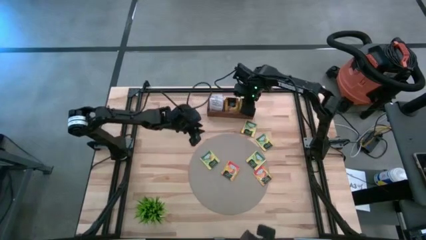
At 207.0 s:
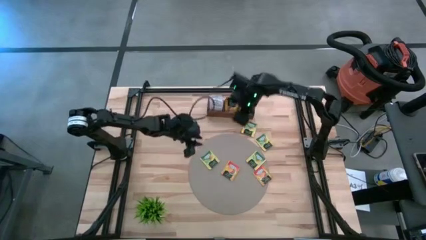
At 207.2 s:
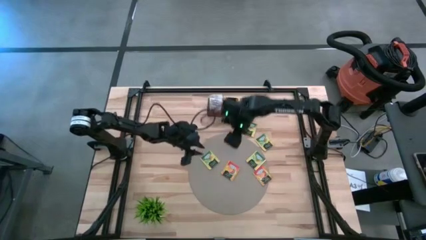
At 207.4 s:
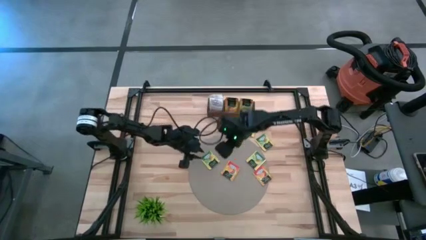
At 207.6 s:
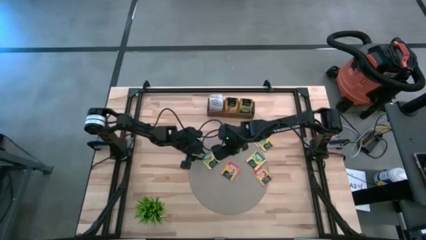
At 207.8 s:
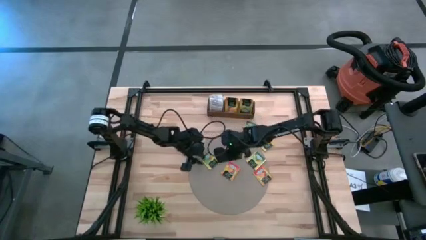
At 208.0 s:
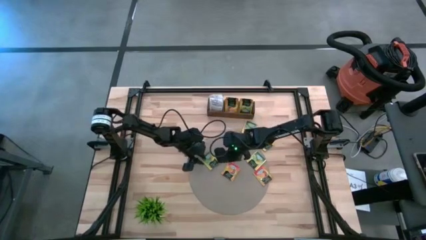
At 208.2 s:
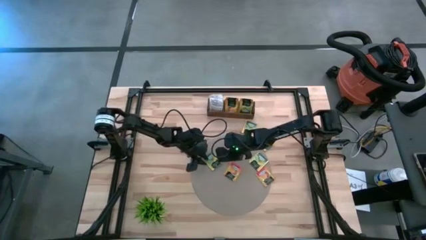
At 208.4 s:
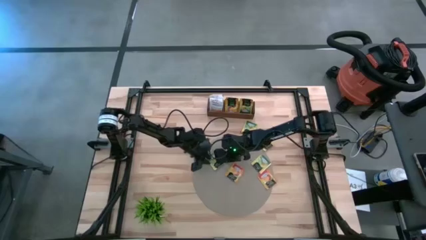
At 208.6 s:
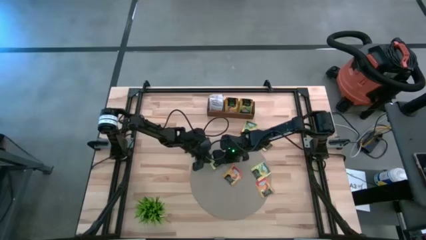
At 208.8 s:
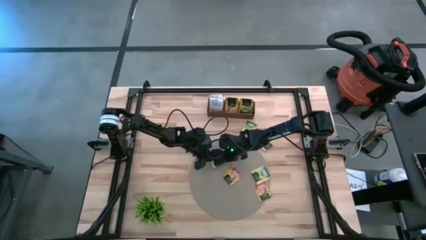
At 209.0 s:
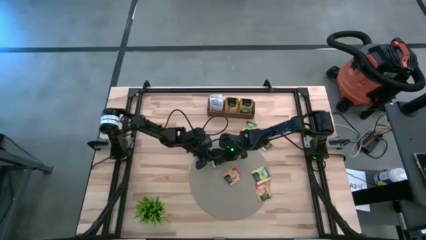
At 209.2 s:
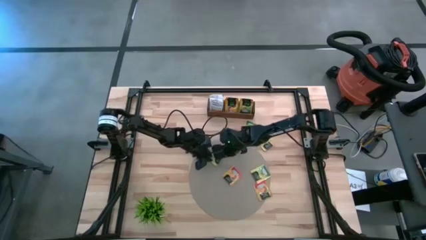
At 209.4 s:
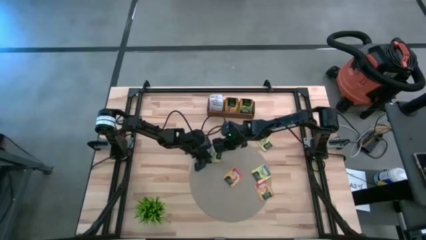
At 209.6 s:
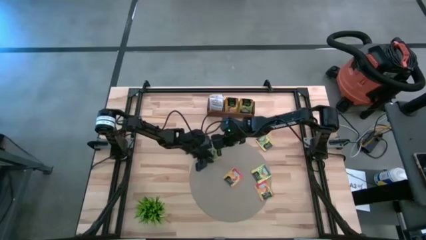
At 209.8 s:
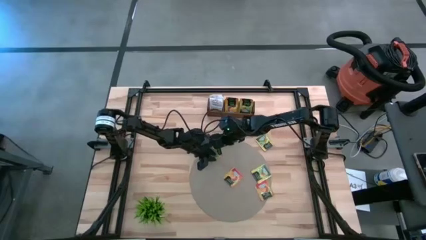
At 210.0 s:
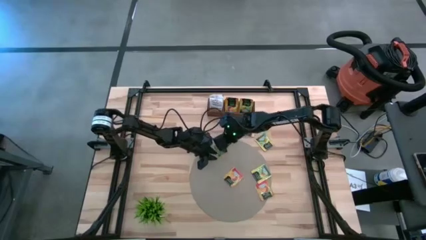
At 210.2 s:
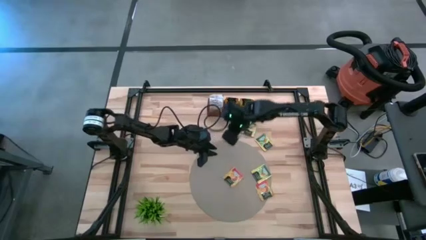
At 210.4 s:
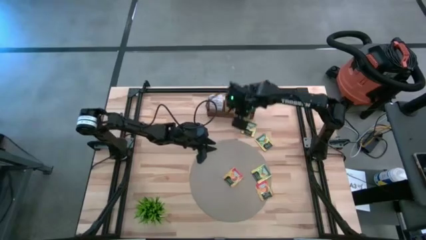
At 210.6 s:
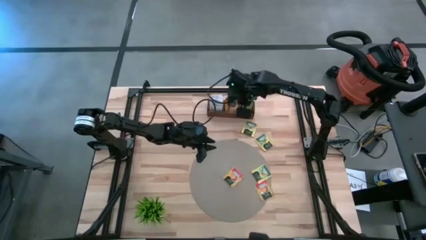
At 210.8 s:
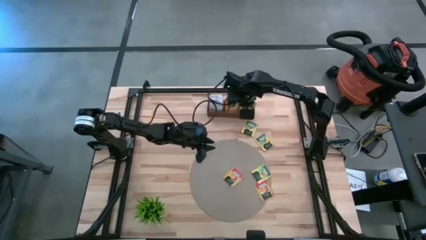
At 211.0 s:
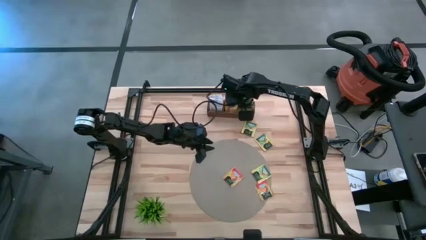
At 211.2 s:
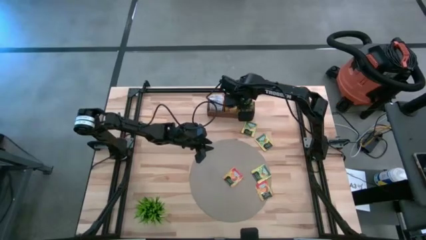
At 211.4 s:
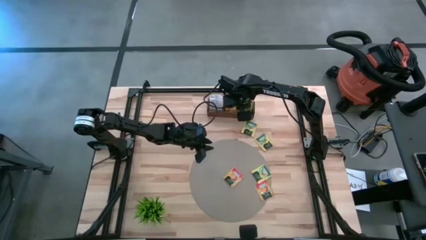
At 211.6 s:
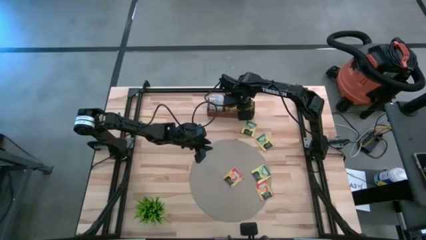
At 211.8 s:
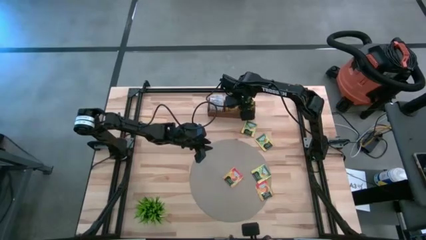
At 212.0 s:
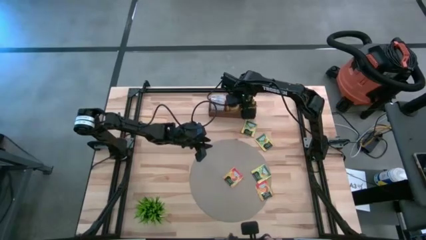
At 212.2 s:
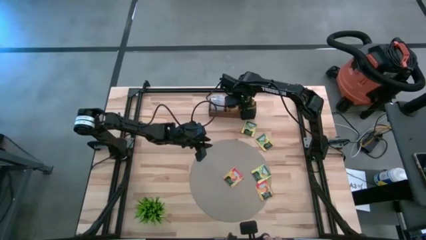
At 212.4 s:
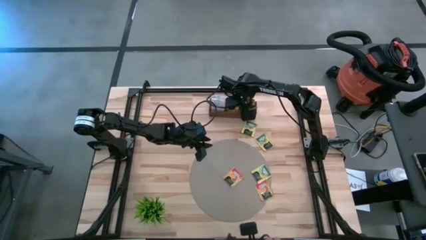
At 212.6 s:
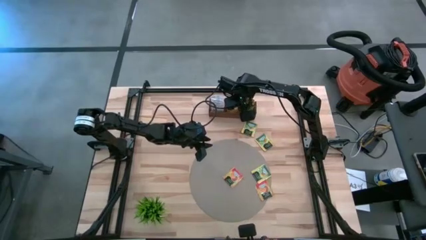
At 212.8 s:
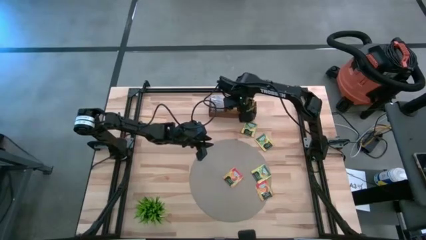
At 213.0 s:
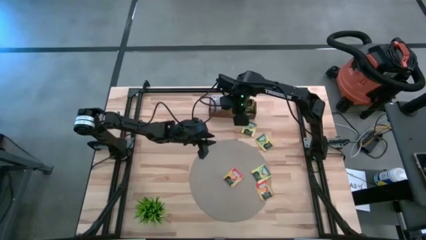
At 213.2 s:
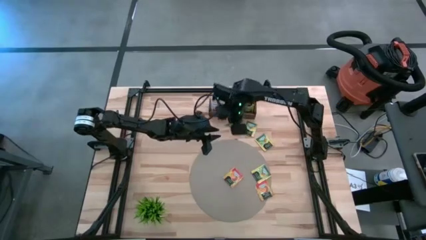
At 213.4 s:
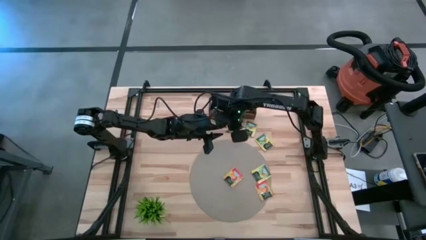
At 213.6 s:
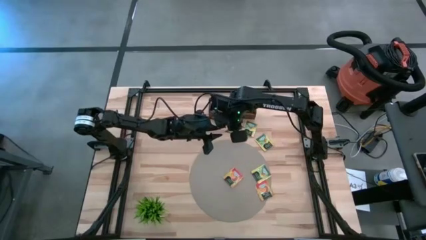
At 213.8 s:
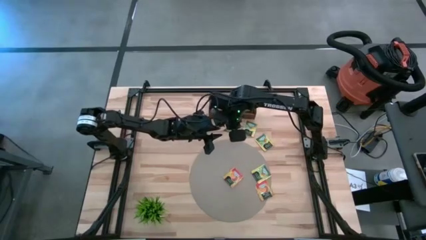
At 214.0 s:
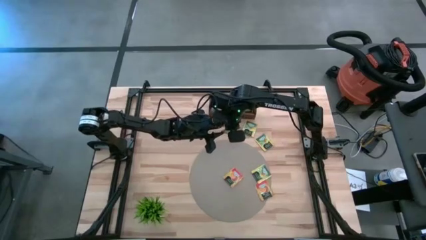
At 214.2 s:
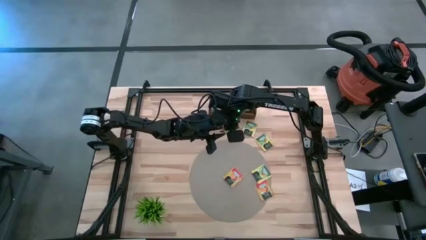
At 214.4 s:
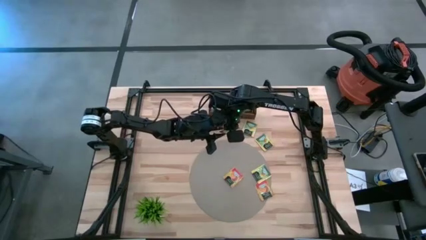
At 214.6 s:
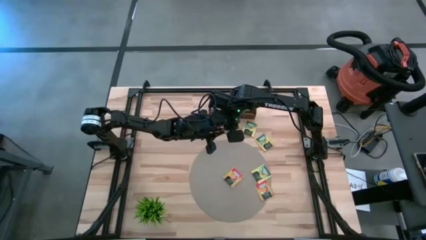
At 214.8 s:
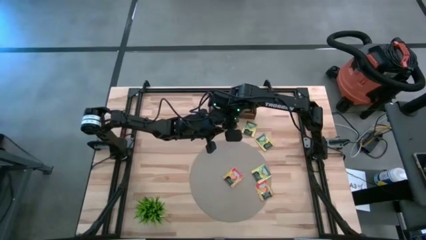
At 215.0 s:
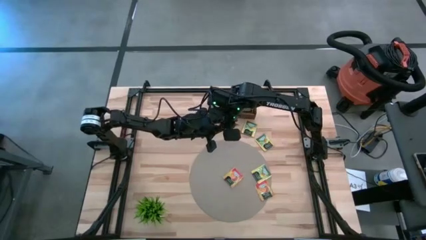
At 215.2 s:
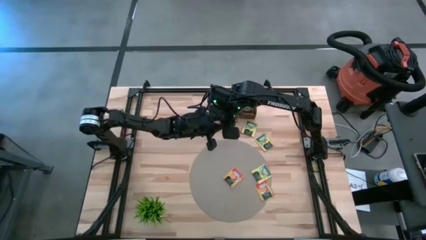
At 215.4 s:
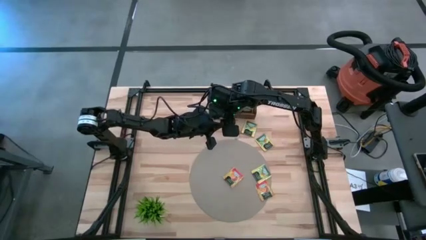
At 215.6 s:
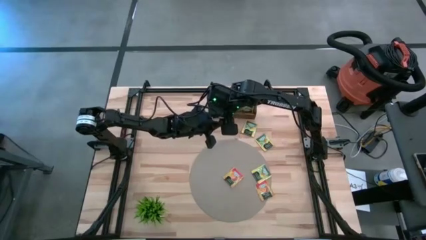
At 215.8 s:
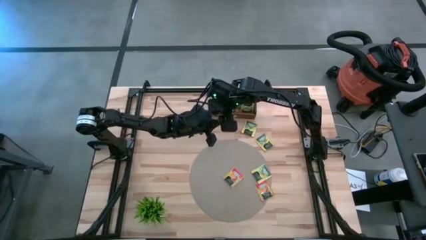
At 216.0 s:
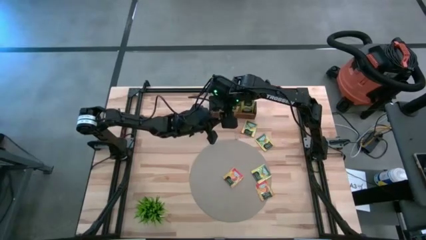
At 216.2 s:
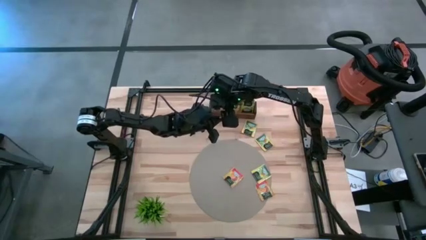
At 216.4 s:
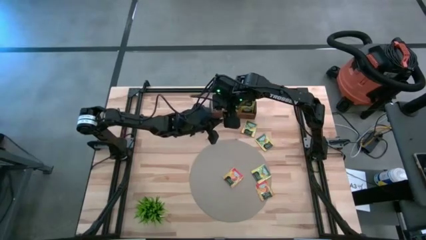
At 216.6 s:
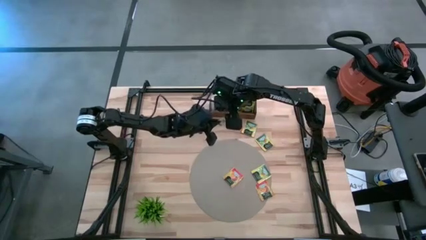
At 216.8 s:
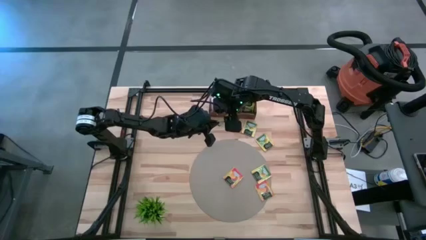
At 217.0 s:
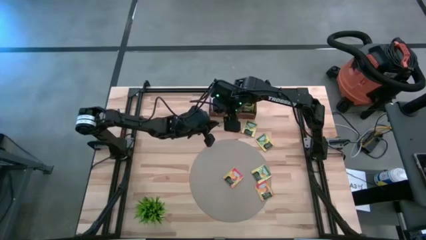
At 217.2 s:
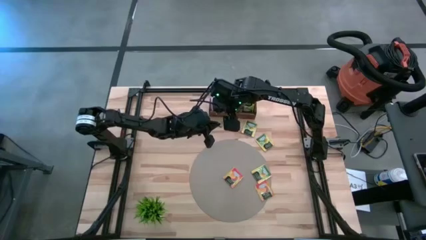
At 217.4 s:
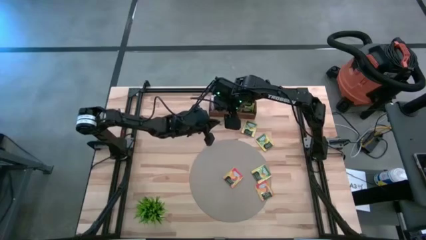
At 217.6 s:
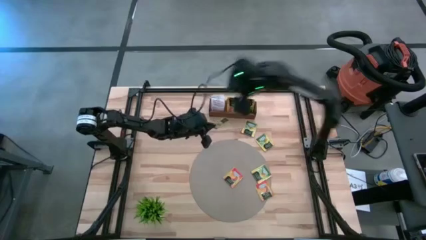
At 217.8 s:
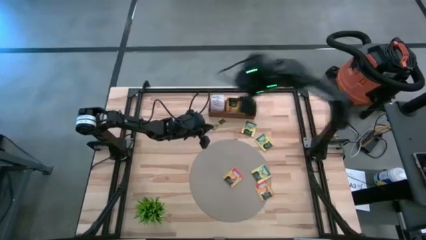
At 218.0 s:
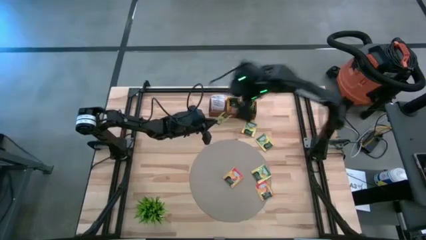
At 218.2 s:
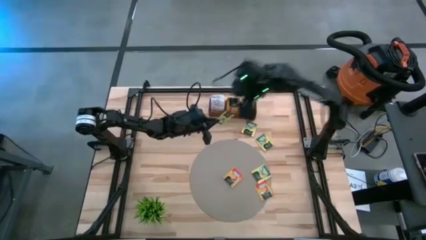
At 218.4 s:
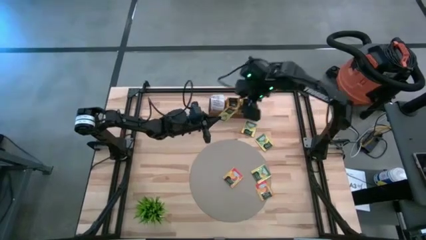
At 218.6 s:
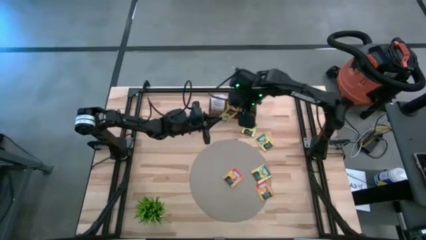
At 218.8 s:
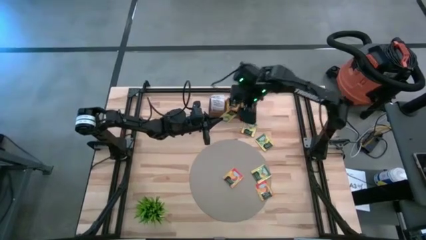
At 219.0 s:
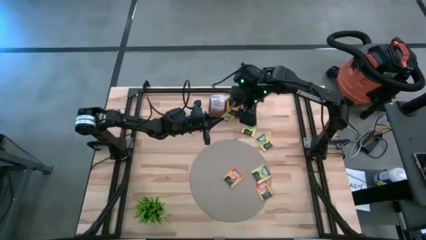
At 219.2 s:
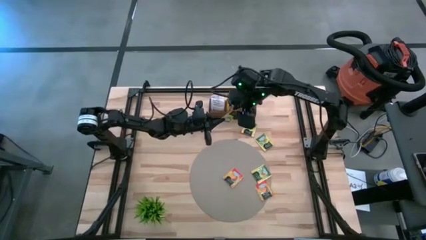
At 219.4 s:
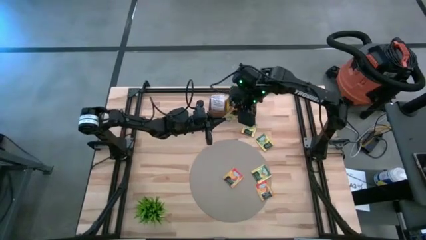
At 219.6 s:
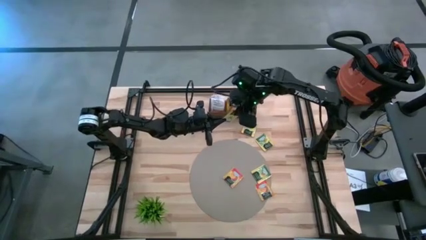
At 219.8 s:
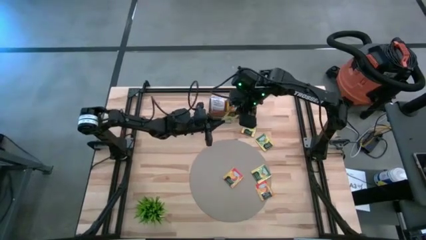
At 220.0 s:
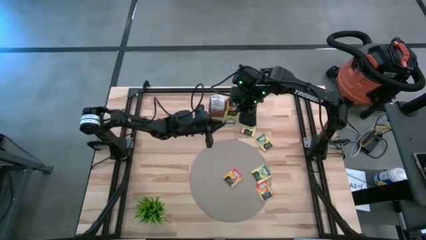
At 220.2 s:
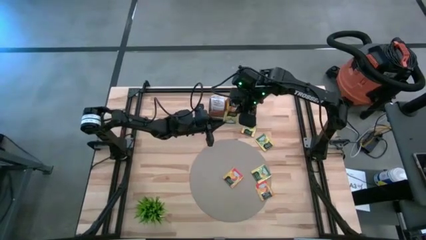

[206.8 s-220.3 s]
Task: Pick & Place Tea
Put the yellow tea bag into the right section of the wooden organizer
